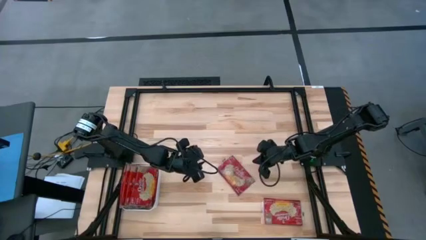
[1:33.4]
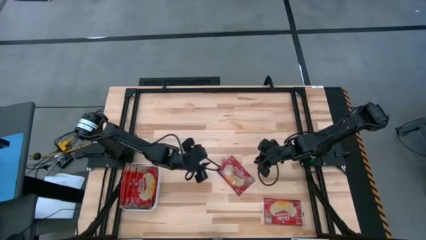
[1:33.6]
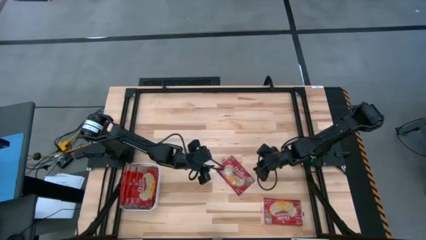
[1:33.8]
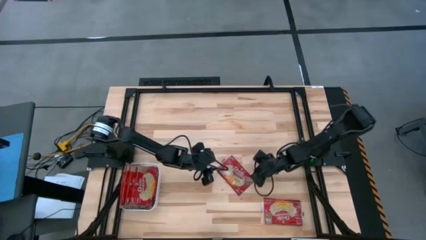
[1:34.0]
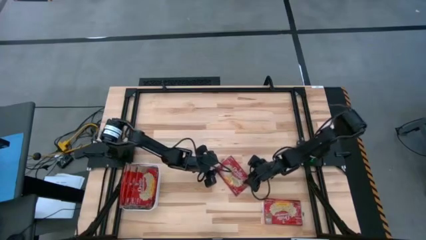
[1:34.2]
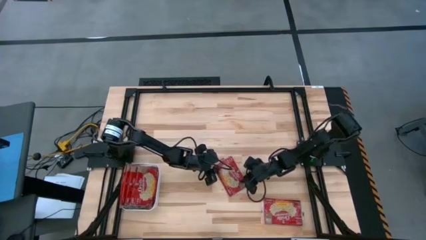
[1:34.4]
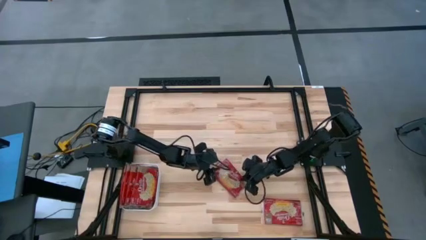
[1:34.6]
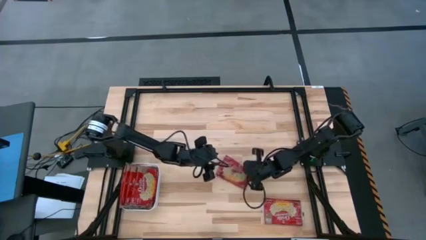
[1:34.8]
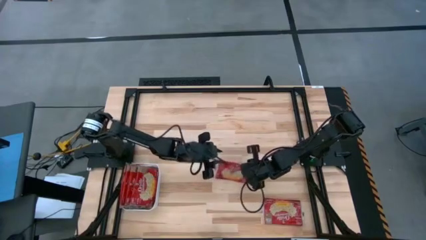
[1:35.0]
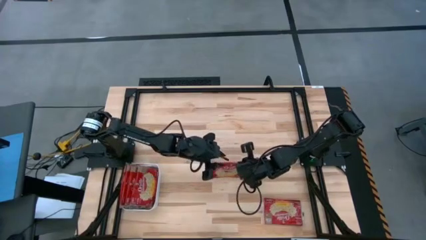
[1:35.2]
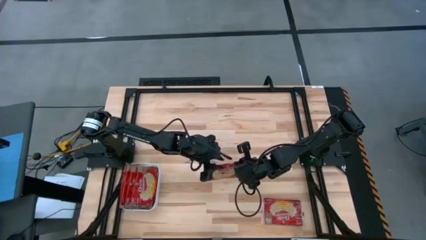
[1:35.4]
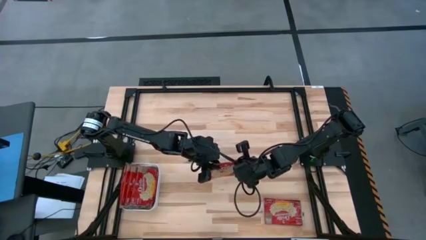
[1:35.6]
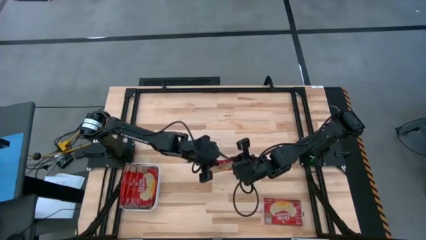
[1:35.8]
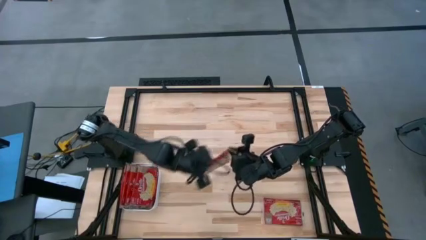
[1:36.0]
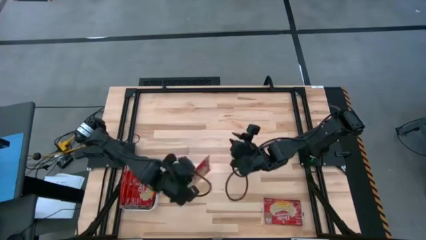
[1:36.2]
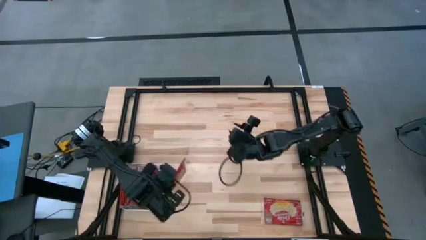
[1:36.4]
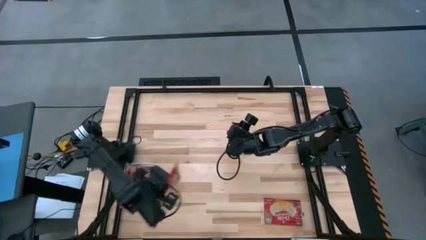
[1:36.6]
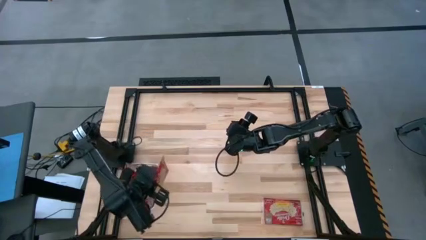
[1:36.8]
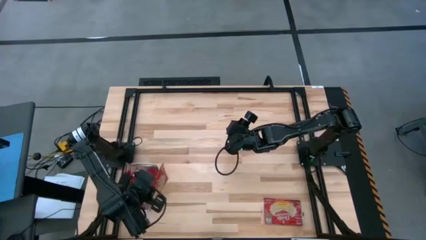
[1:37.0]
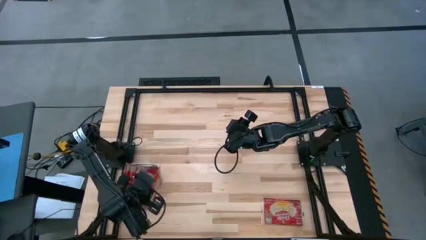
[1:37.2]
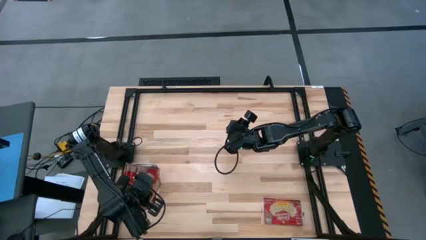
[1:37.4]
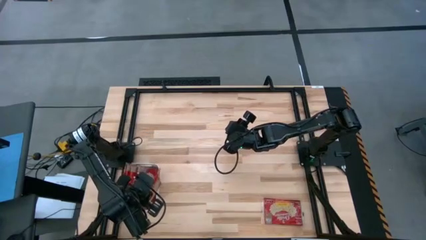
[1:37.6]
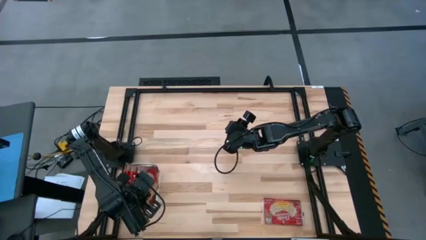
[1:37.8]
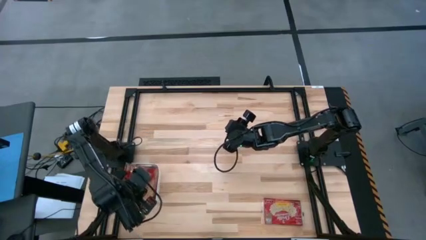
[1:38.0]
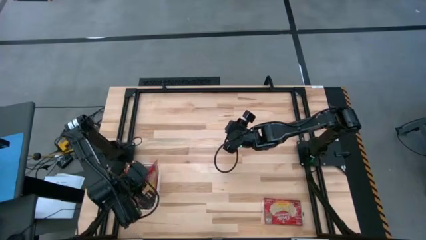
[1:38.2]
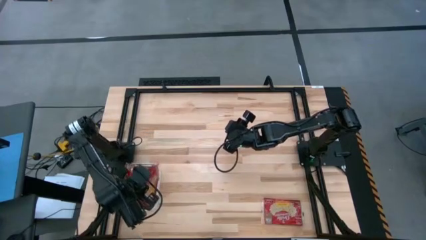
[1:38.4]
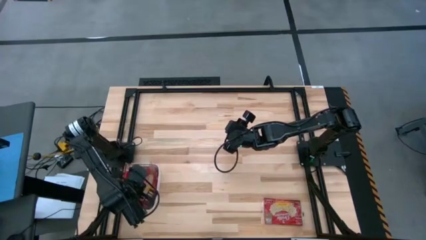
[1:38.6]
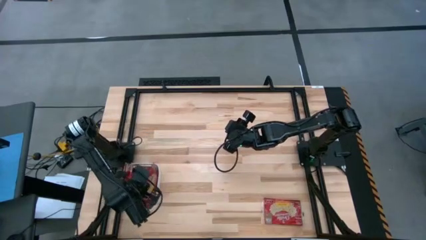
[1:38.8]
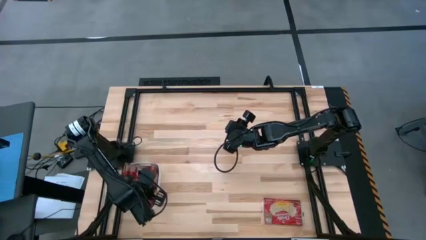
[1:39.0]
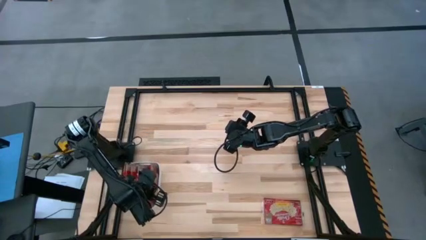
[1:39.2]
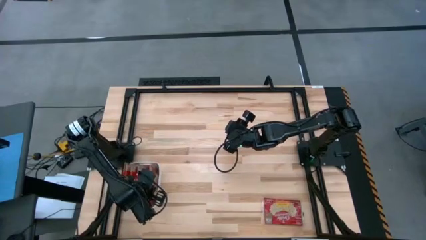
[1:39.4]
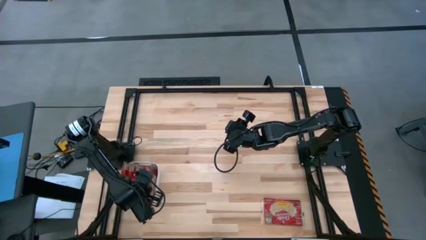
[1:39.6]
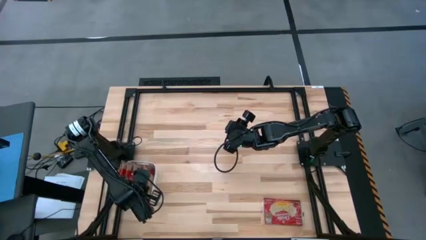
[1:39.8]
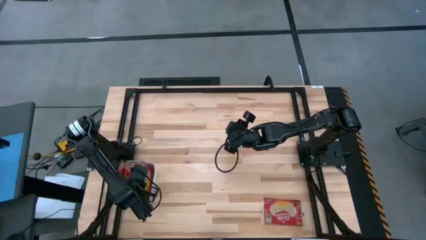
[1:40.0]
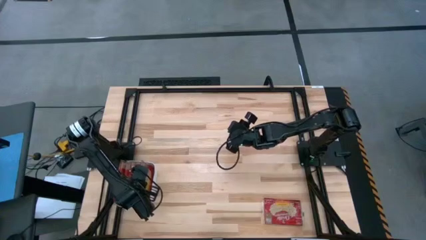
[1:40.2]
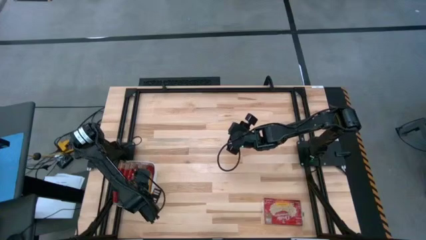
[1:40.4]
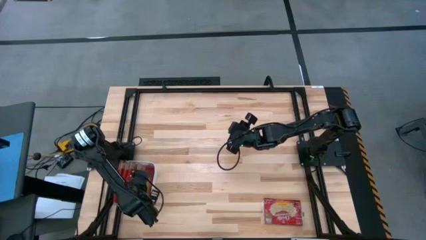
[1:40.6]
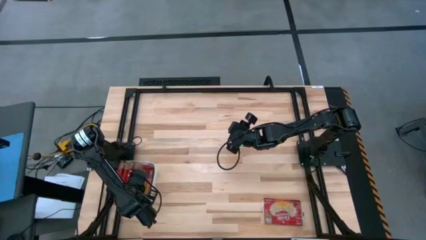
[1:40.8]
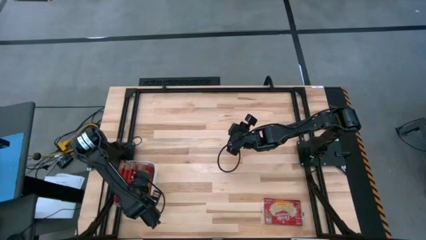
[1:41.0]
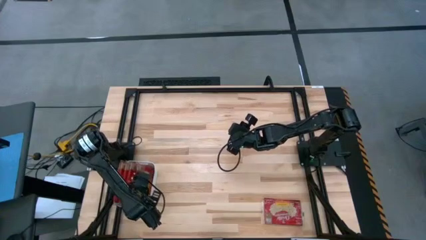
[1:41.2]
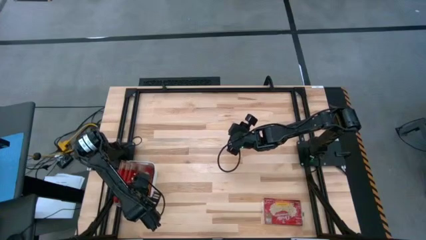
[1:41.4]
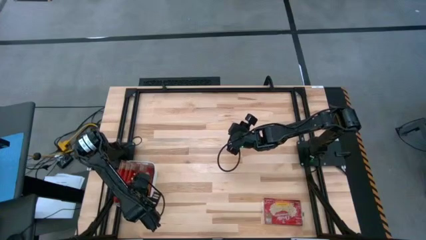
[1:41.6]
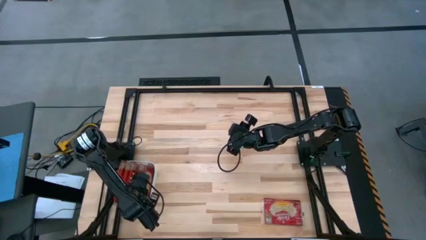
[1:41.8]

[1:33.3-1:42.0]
Task: Sort popcorn bags into baskets
Put the red popcorn bag into the white bin

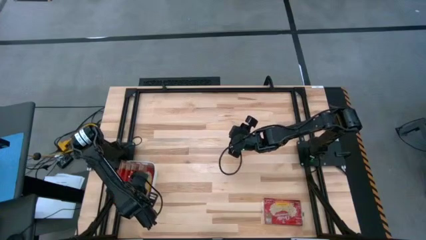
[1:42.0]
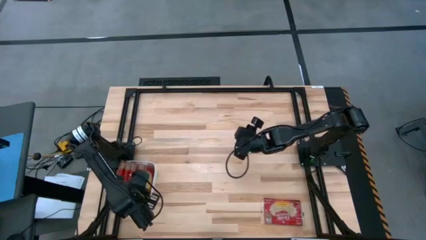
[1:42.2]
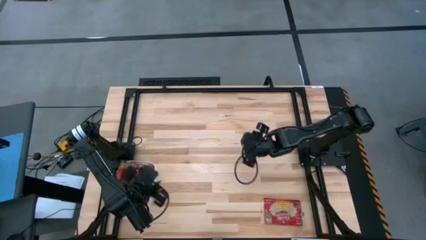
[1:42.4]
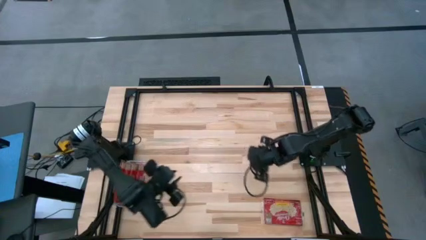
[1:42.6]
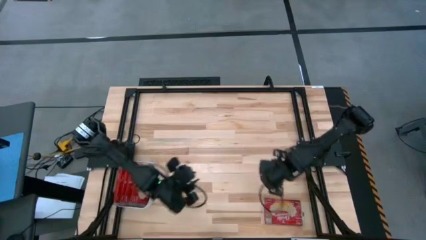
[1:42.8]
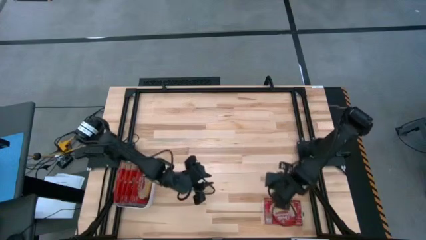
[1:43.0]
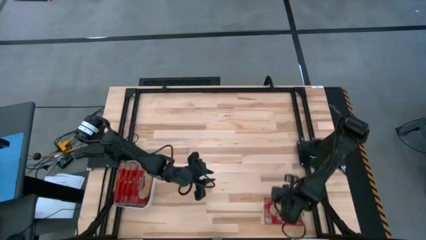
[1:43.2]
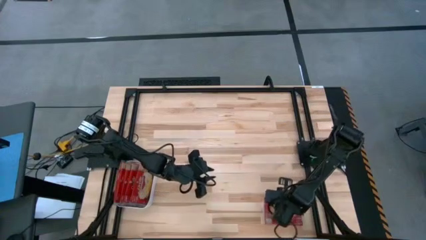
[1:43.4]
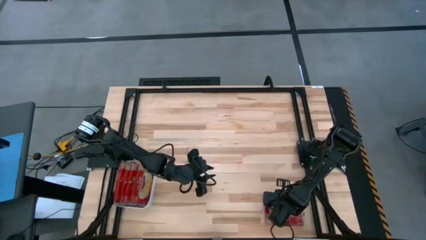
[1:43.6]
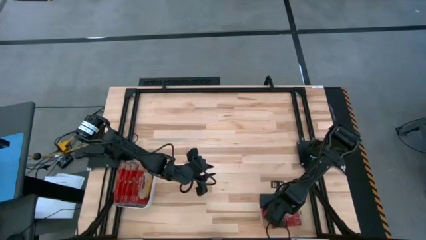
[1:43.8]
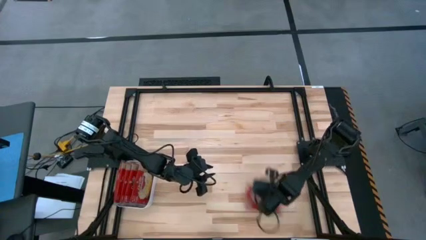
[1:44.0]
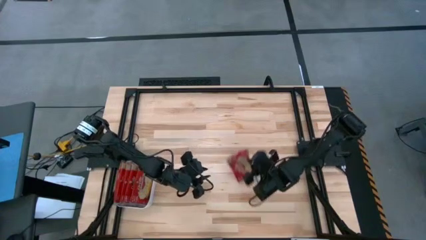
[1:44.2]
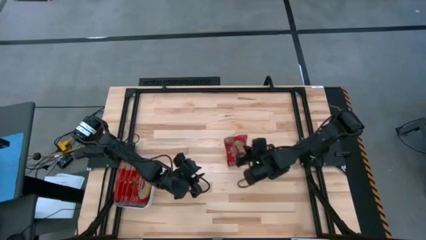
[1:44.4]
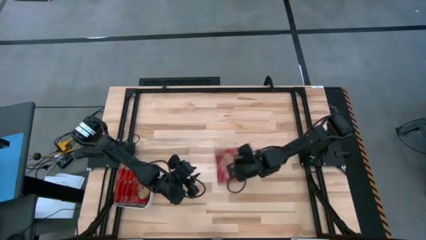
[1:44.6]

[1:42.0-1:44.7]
Put the red popcorn bag into the white bin

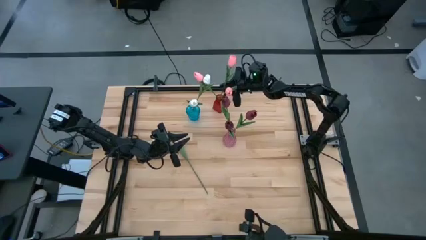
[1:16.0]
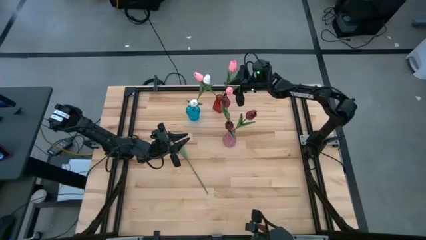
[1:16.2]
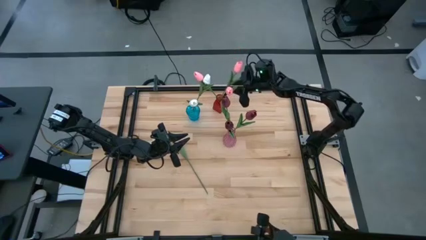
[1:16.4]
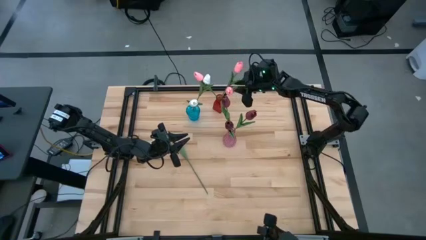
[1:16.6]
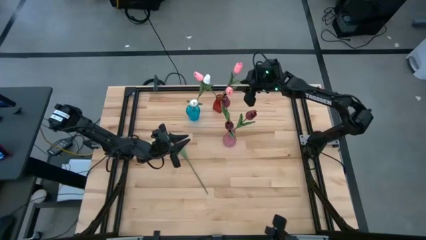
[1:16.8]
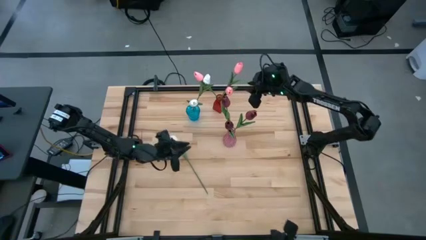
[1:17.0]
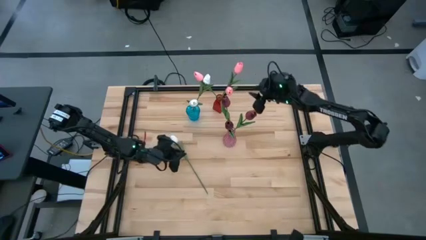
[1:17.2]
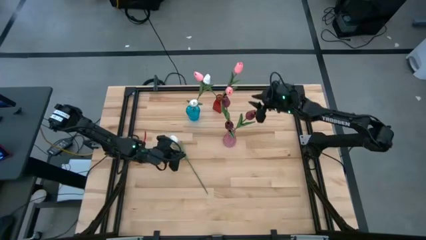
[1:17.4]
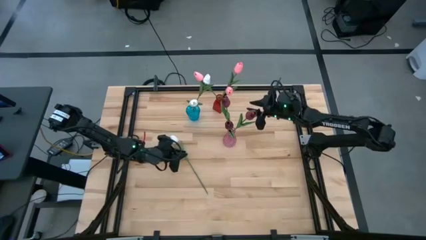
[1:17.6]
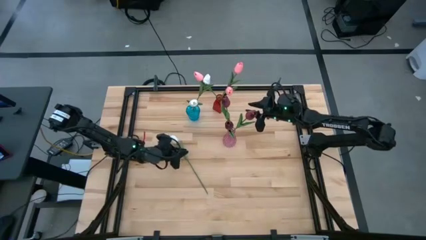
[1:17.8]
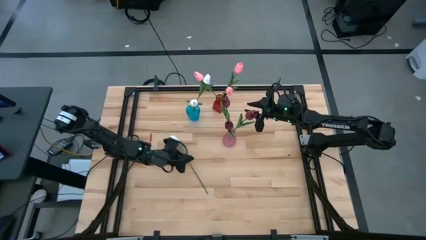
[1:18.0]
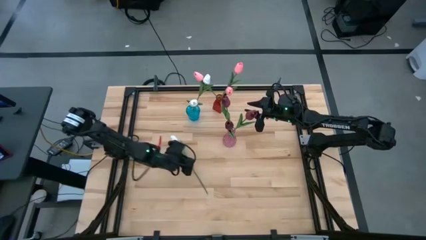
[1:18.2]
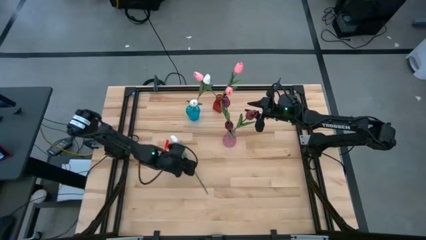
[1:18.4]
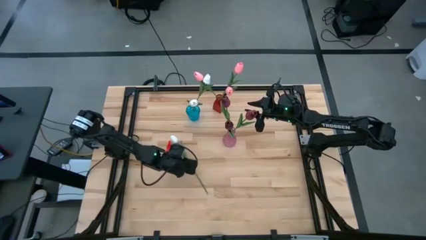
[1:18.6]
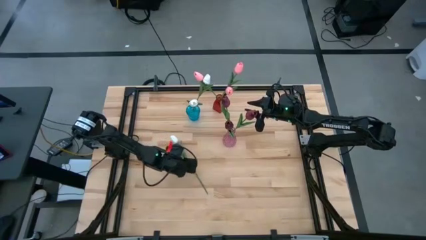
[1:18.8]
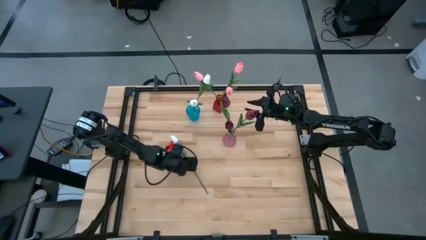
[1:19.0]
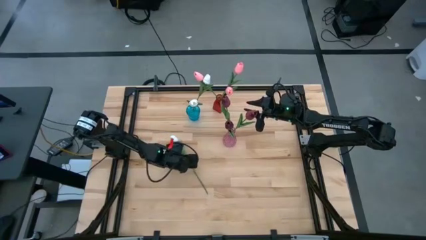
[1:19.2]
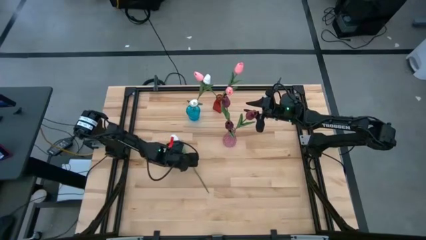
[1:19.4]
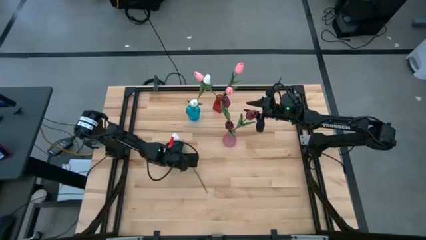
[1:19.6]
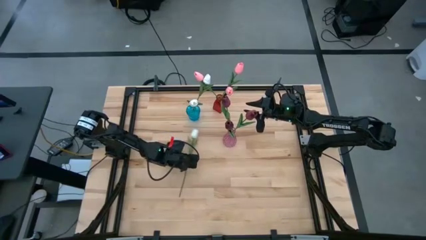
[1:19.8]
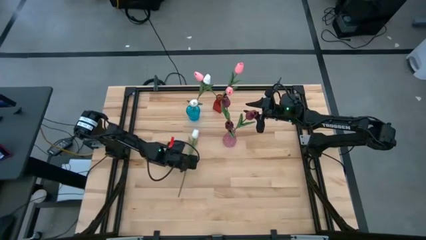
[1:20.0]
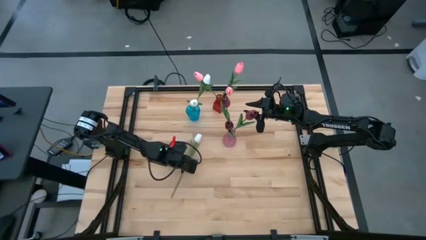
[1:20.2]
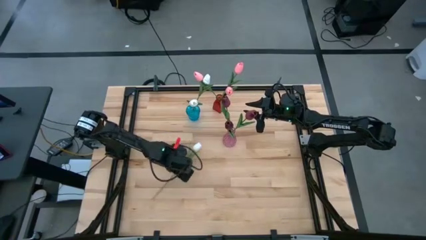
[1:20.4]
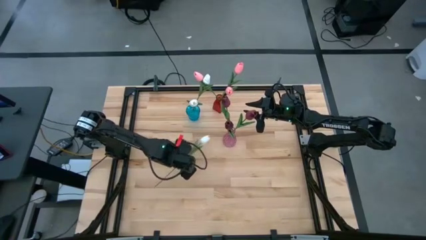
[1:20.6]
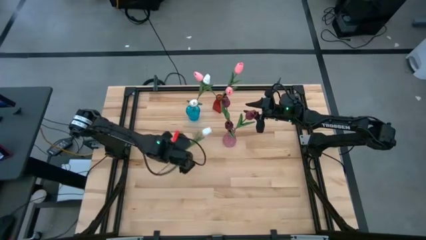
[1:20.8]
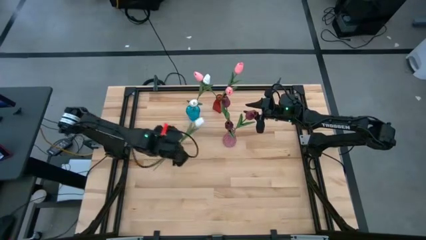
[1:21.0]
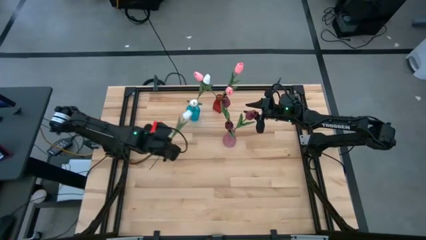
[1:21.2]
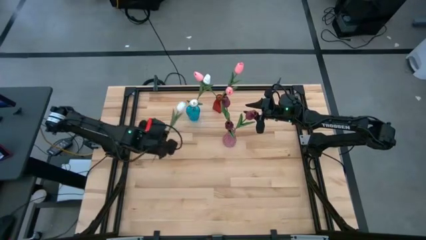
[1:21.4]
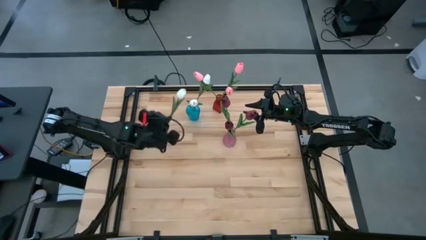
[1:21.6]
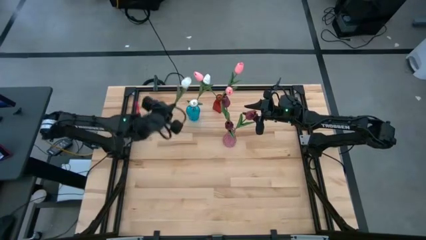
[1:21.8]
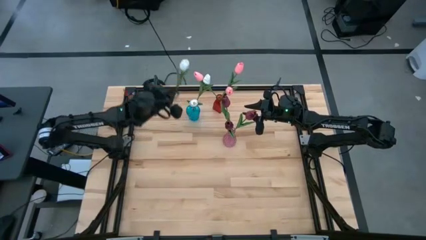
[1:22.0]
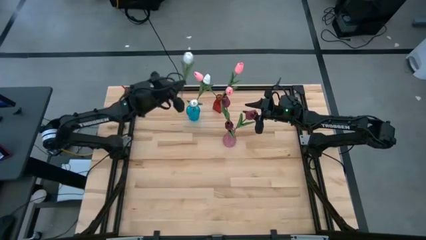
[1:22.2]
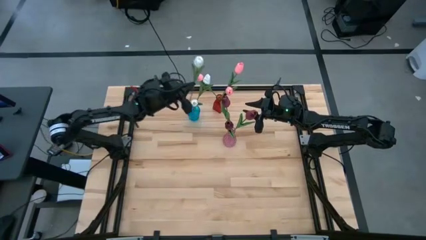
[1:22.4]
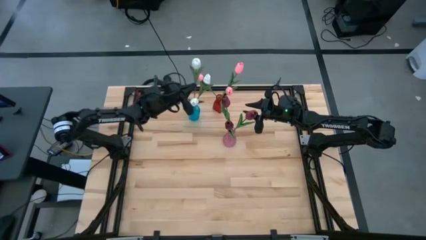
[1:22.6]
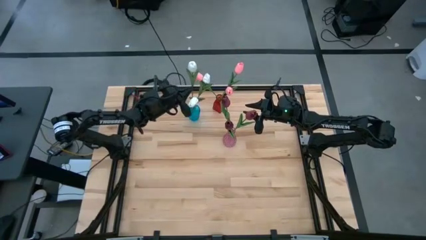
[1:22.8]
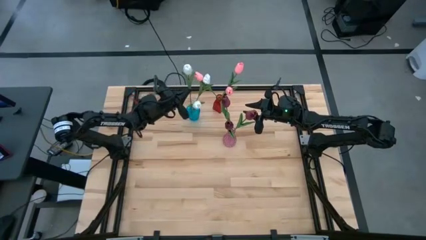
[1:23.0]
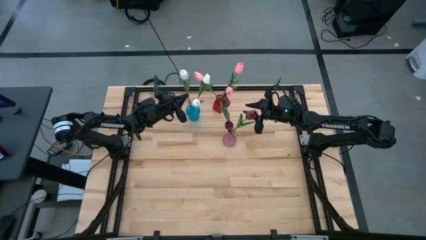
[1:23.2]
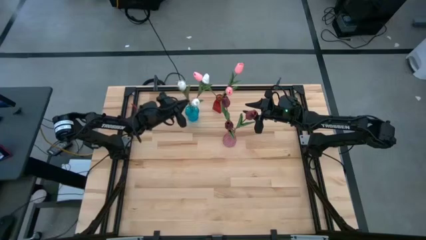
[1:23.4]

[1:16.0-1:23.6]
Task: Sort flowers into vase by color
Put the white flower into the blue vase
